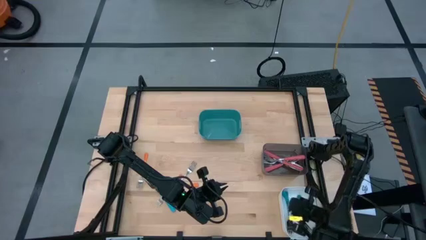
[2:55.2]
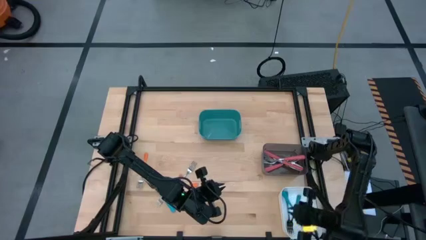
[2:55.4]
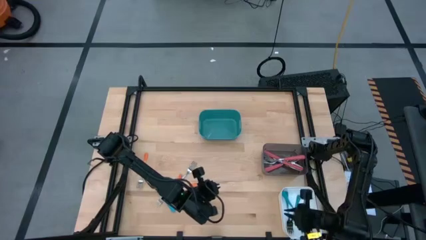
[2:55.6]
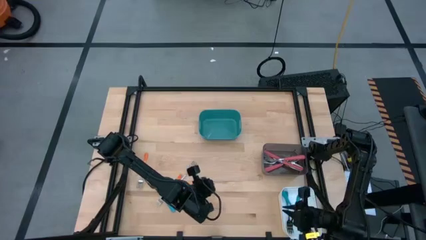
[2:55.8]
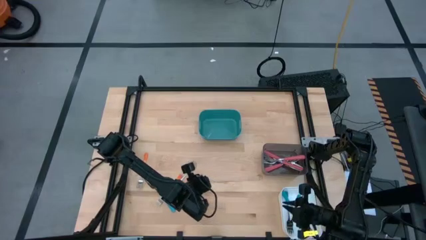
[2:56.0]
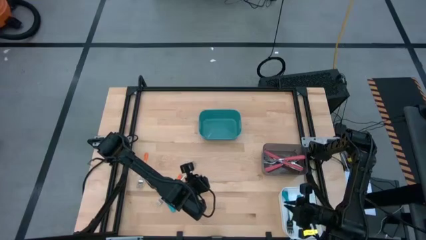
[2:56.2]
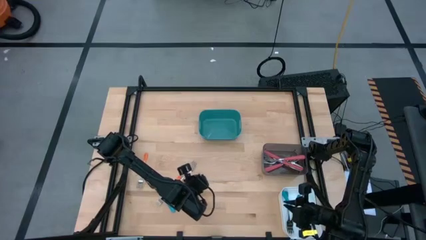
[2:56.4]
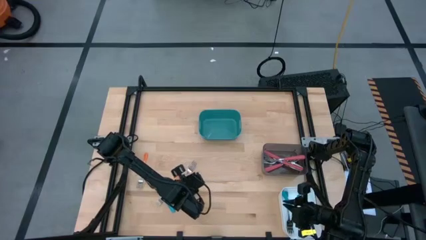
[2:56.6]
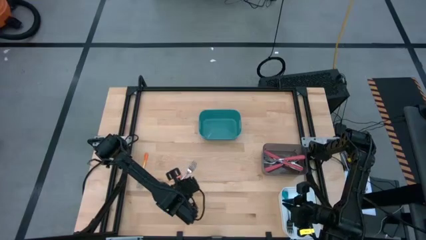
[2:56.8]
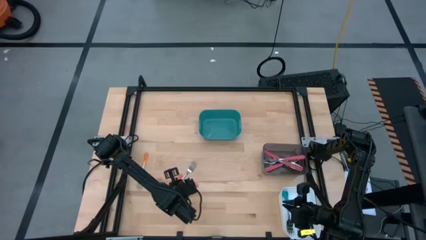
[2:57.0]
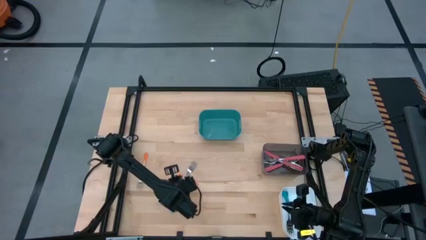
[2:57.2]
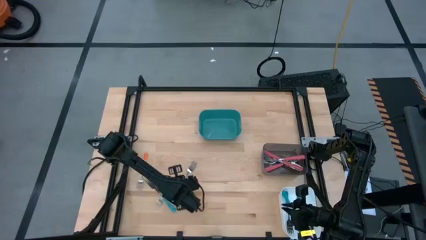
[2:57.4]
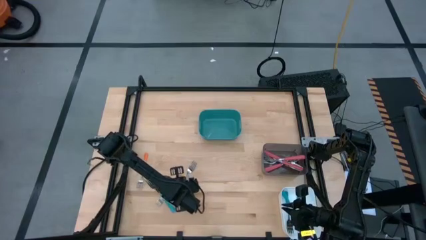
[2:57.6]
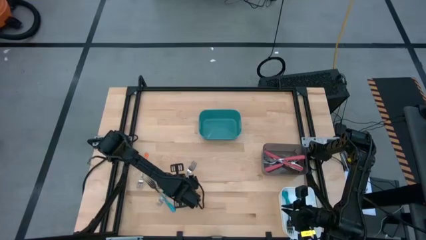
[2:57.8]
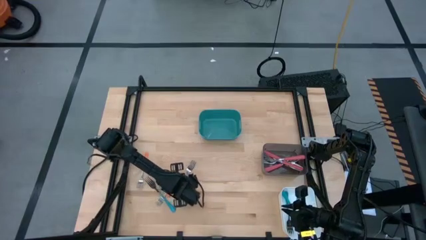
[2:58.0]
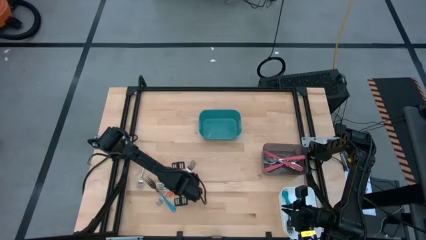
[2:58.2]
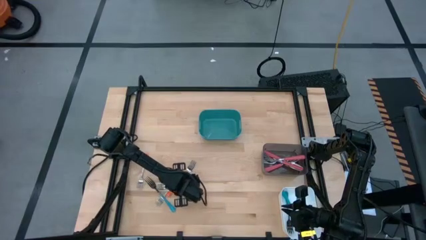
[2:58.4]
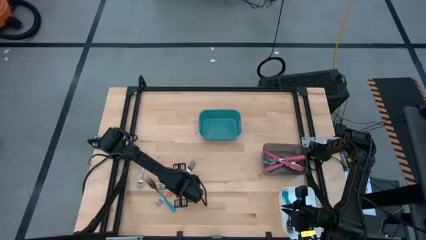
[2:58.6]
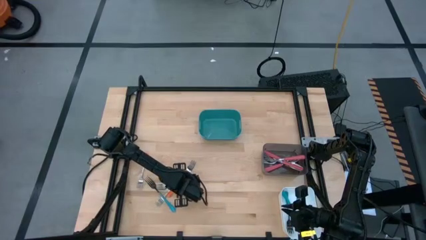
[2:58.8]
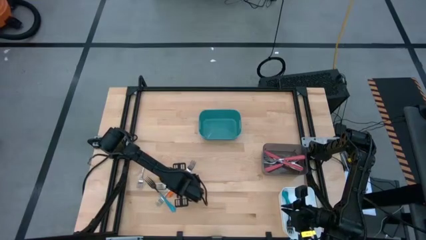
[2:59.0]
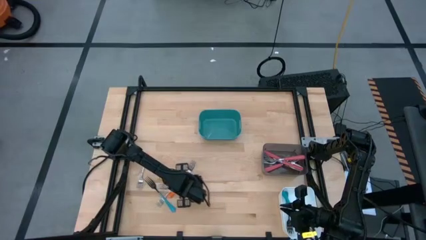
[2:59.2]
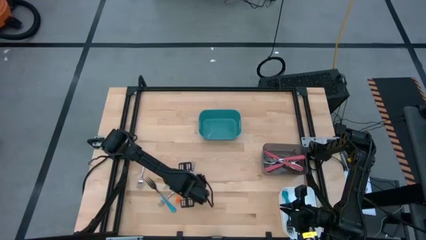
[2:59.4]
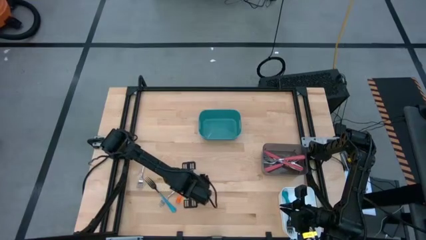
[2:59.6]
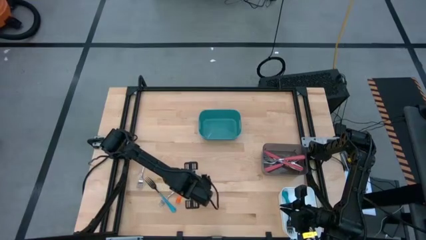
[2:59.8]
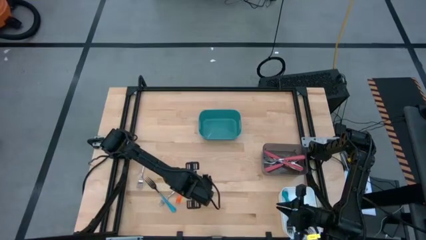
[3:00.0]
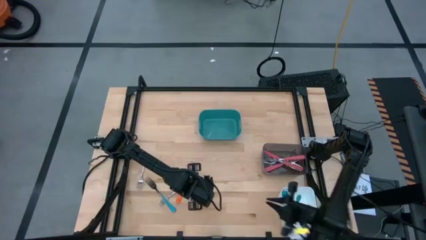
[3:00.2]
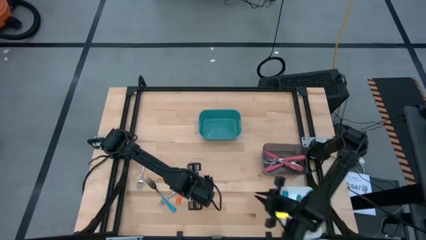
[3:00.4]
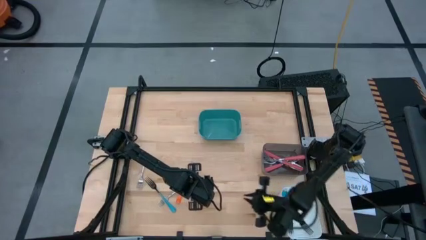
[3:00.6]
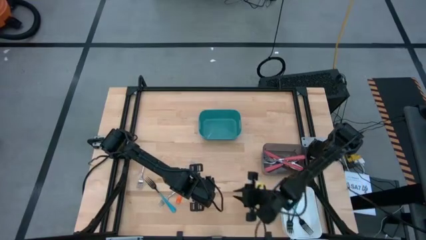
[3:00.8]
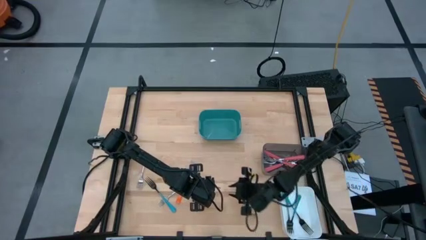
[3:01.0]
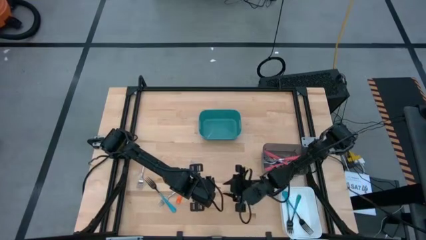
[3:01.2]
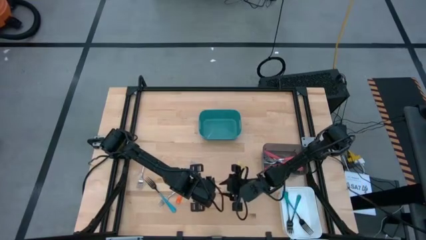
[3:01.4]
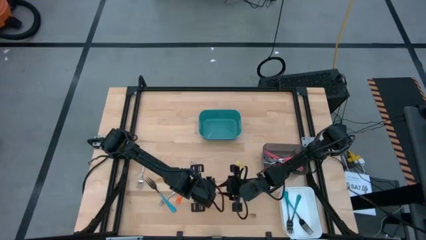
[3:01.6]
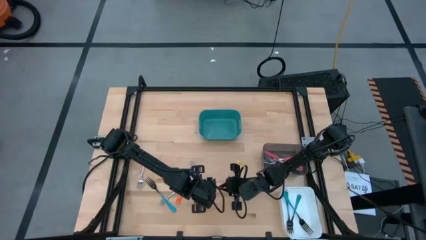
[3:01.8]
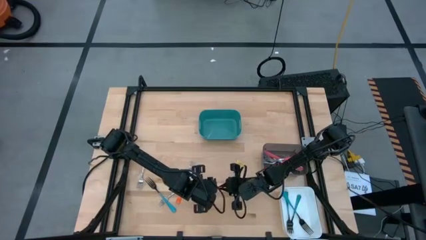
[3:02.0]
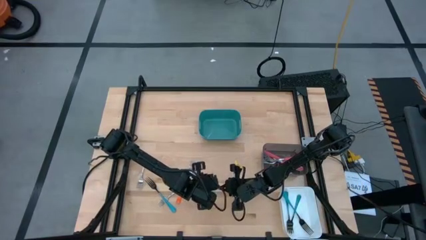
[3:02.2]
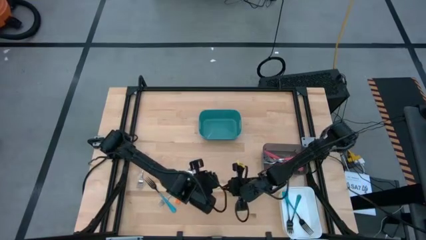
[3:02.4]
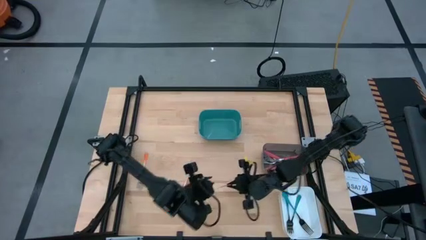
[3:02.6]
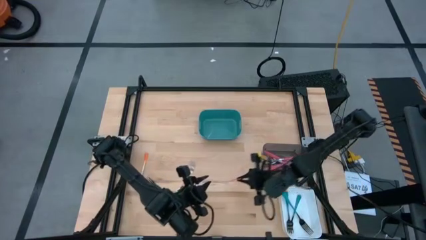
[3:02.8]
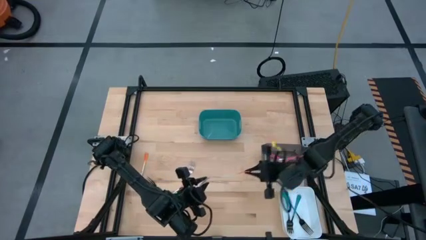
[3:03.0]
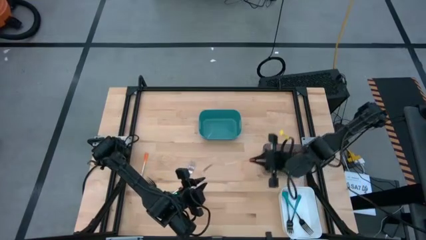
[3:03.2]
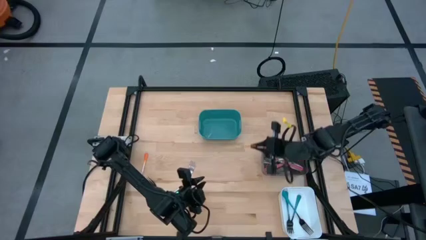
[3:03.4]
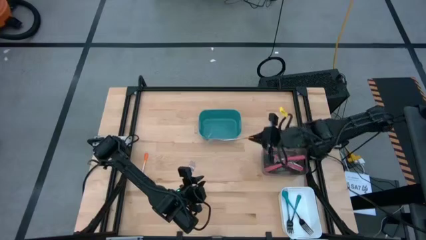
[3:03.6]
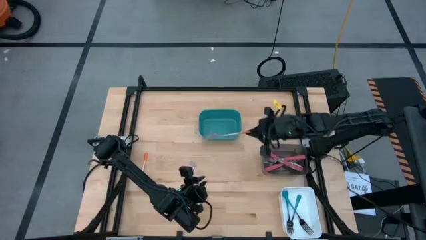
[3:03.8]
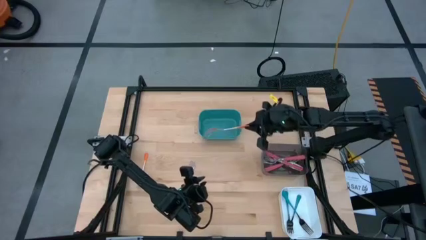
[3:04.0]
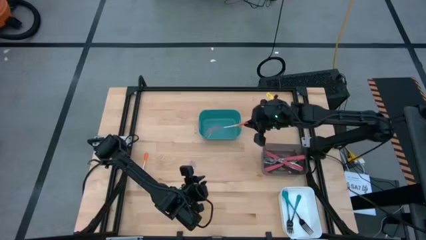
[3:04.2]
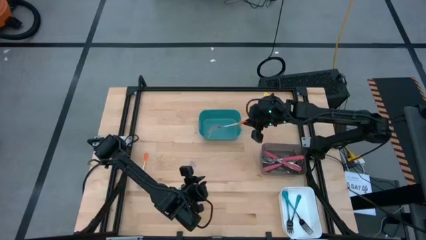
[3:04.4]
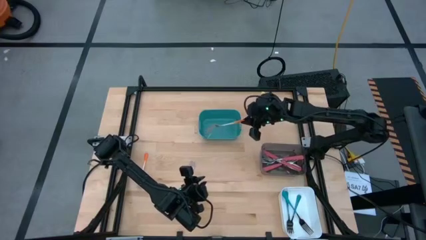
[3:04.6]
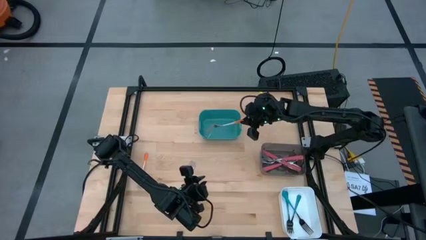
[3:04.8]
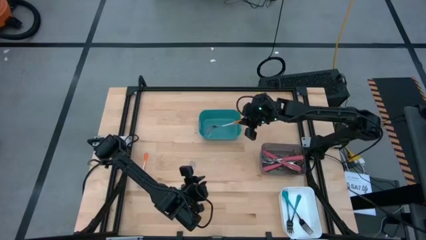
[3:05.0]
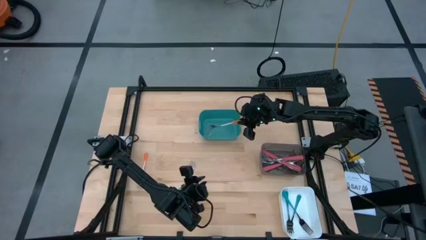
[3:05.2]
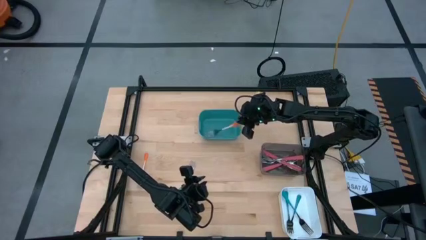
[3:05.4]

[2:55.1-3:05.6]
Task: Sort silverware by color (type)
Put the orange fork into the blue bin

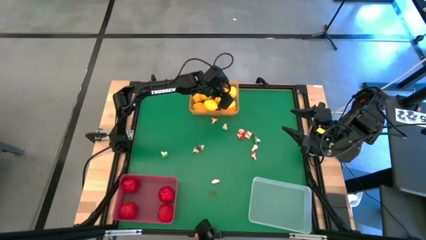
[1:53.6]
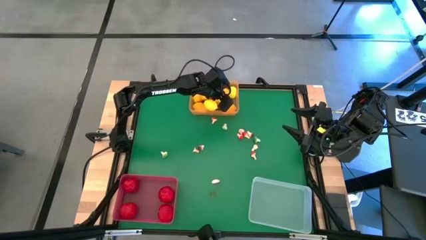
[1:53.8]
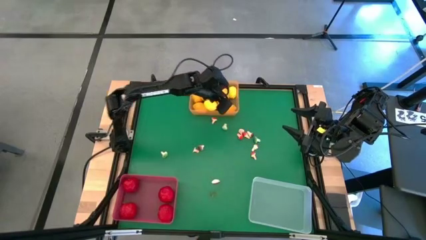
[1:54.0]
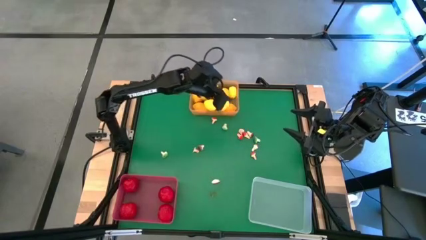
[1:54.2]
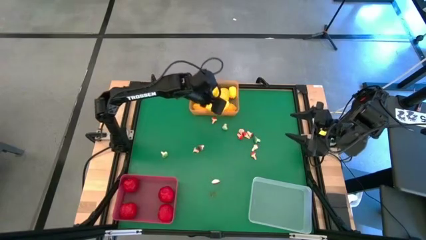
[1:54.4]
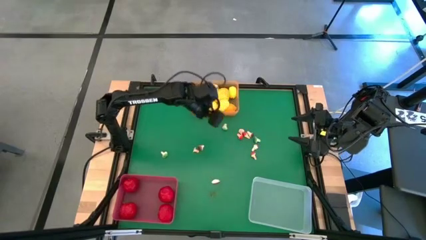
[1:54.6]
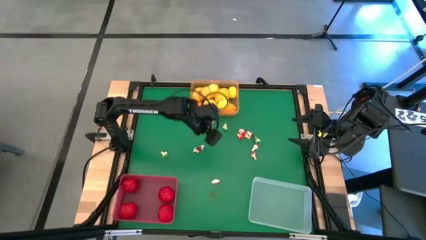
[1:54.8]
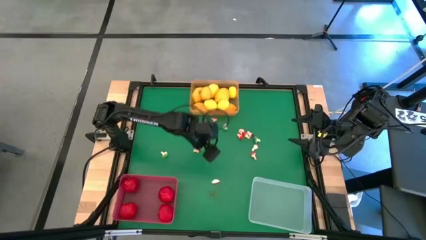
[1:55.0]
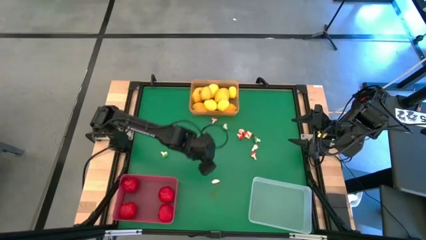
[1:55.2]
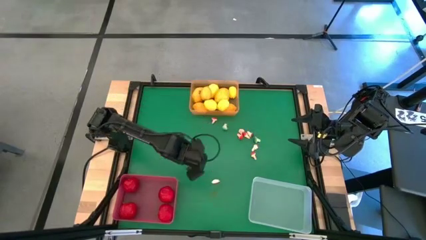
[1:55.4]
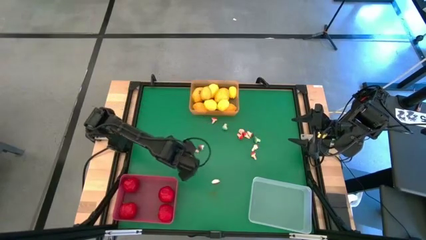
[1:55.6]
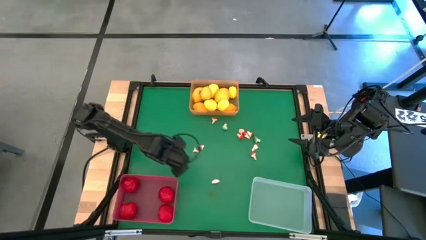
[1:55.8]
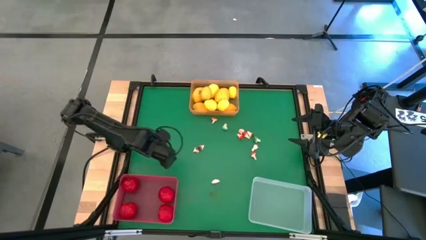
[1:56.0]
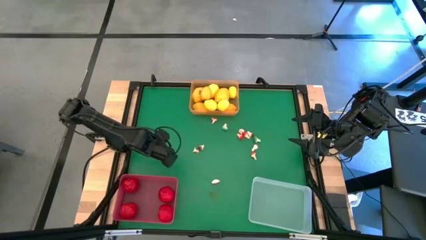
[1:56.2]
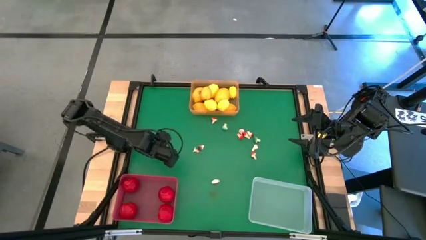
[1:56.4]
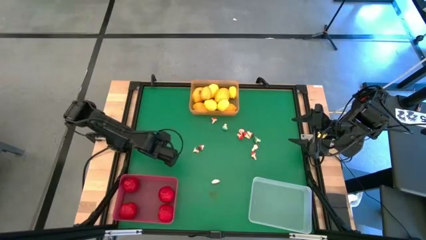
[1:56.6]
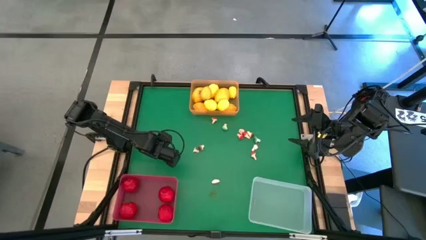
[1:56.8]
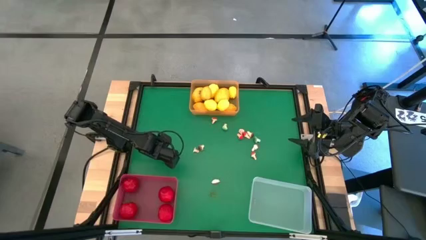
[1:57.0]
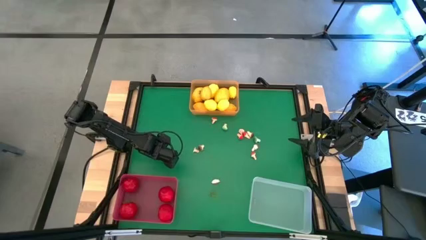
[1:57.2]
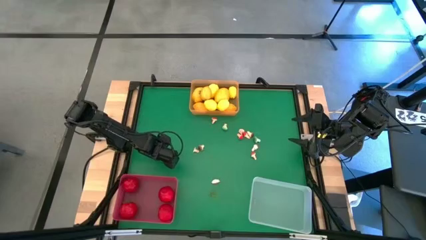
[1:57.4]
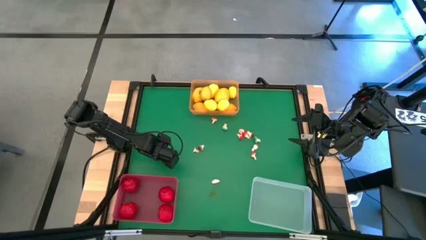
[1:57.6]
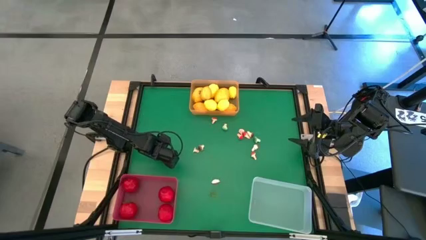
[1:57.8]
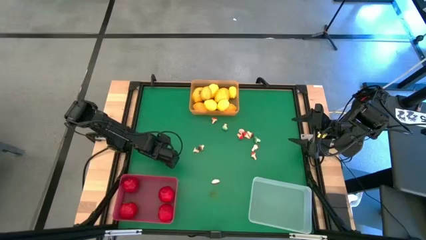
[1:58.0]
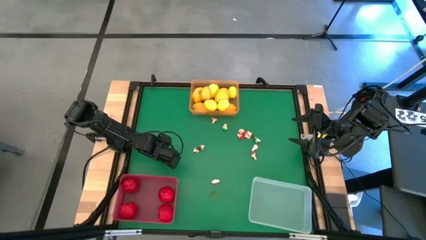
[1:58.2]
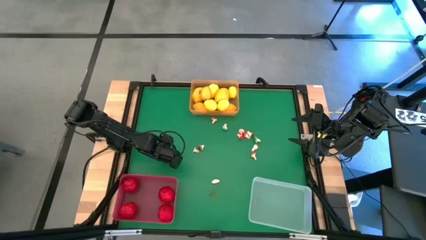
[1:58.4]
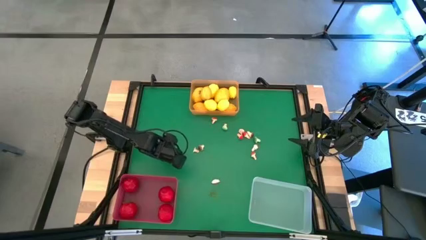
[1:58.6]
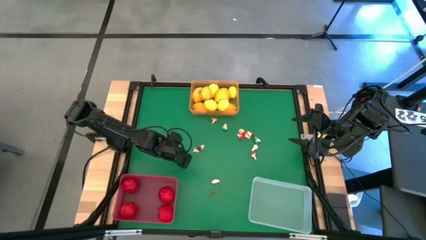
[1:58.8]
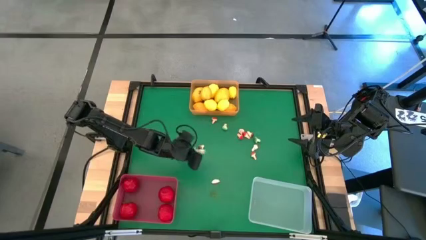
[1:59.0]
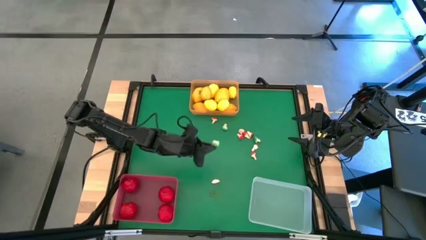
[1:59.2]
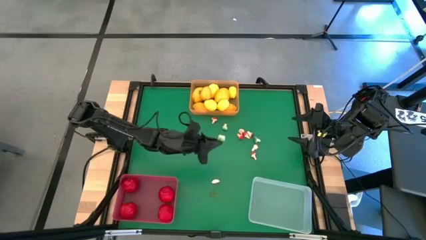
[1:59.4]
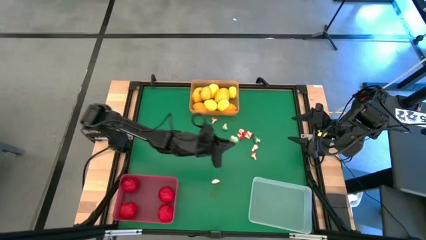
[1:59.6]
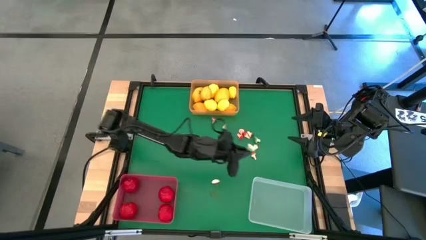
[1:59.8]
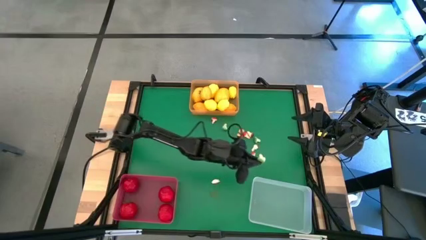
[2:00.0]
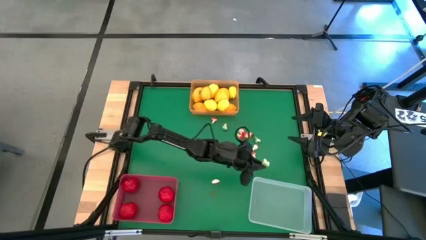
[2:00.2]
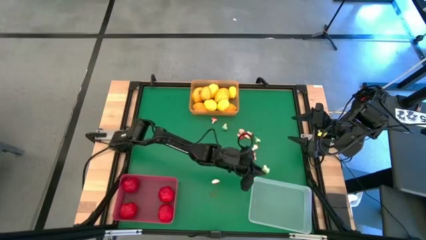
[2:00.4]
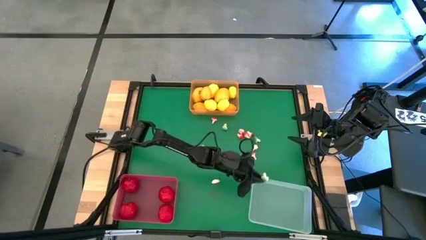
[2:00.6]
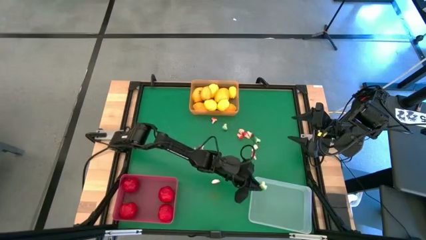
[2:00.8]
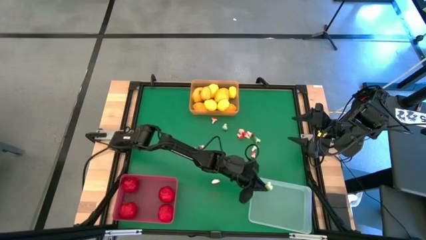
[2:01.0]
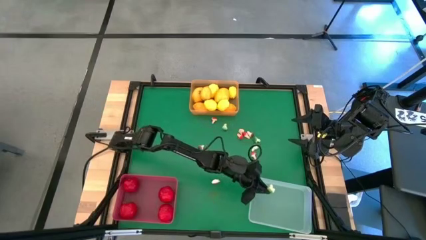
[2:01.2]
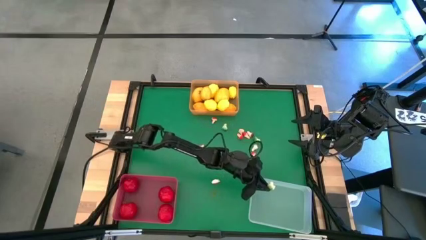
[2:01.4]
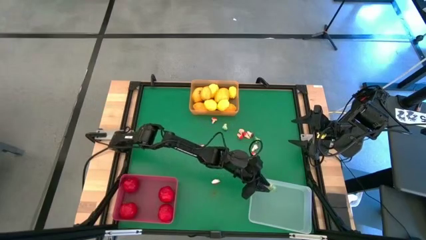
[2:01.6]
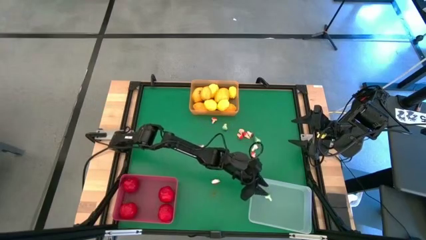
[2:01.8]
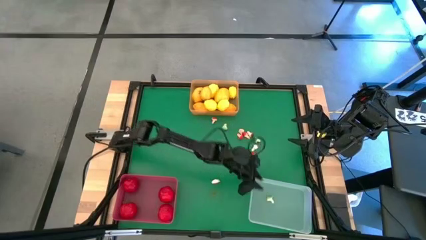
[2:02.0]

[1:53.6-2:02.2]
Task: Sort produce into baskets
Put the green mushroom into the transparent bin
